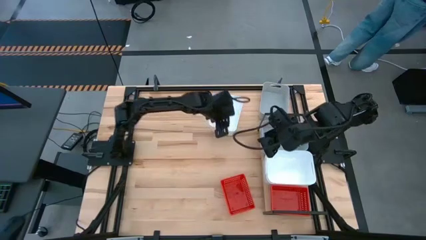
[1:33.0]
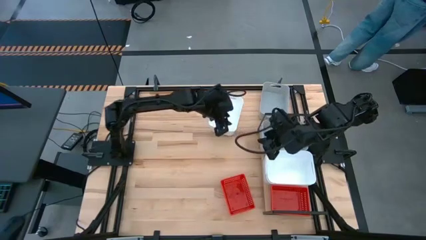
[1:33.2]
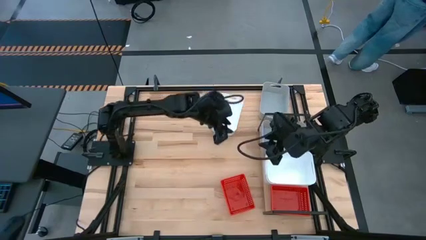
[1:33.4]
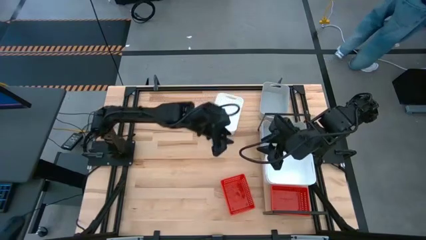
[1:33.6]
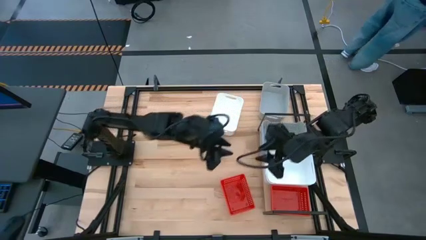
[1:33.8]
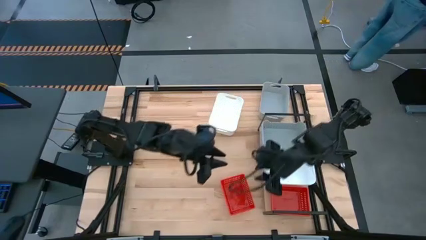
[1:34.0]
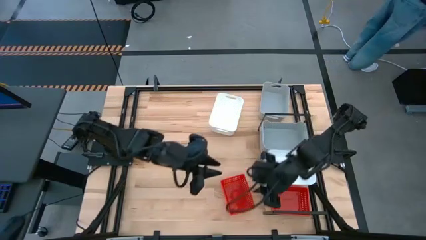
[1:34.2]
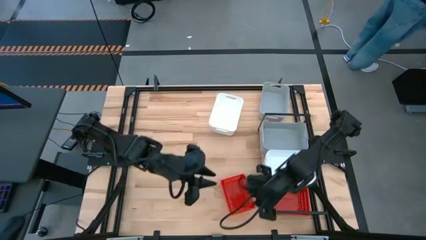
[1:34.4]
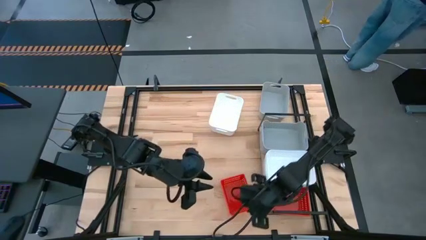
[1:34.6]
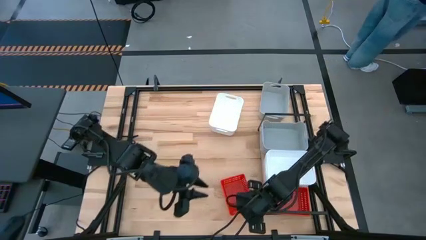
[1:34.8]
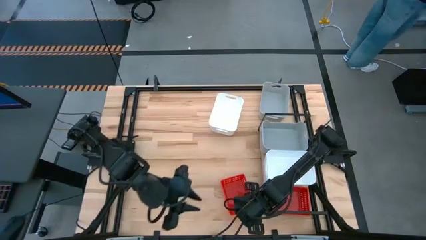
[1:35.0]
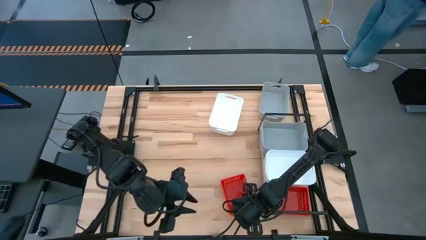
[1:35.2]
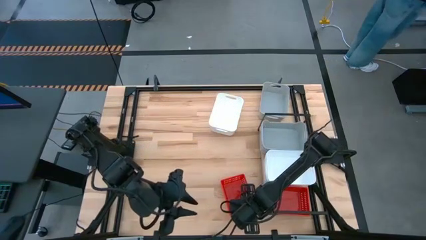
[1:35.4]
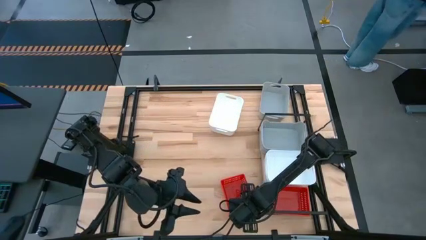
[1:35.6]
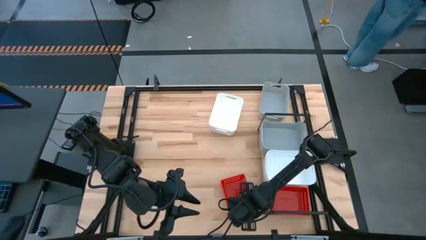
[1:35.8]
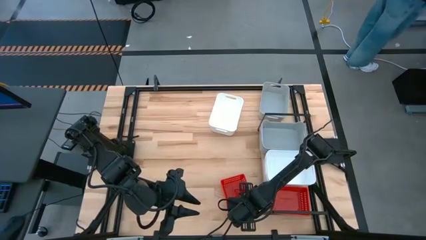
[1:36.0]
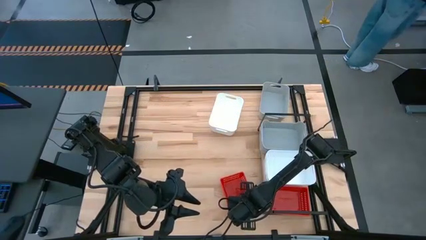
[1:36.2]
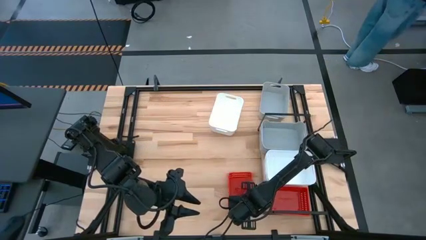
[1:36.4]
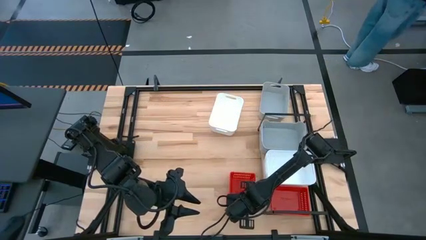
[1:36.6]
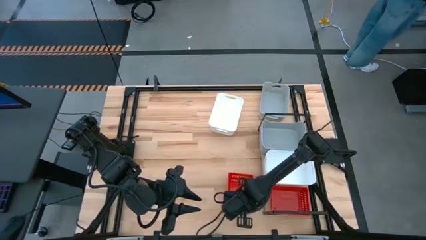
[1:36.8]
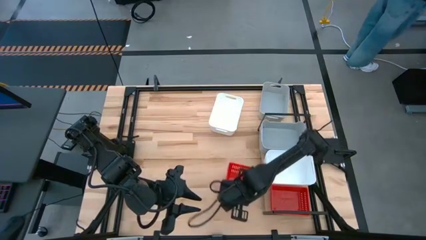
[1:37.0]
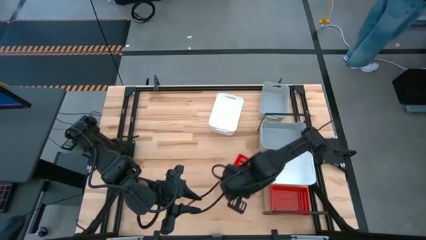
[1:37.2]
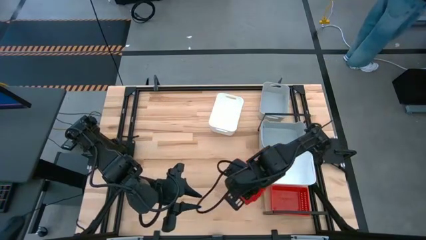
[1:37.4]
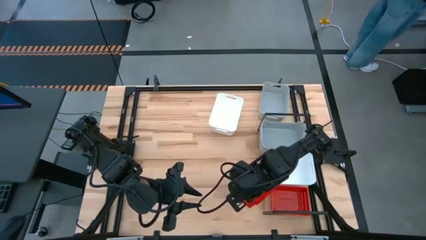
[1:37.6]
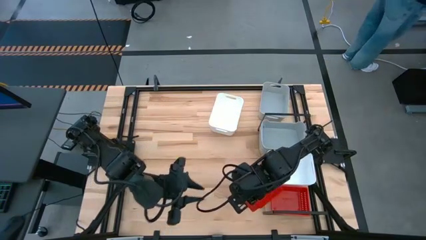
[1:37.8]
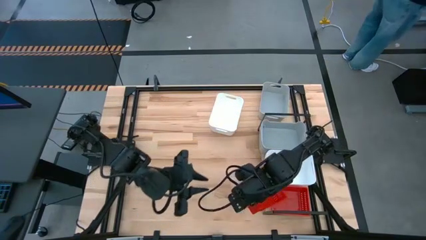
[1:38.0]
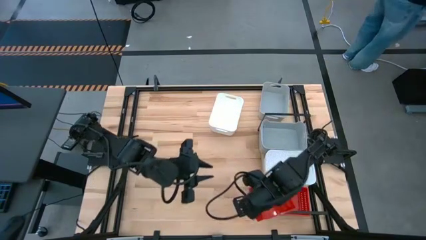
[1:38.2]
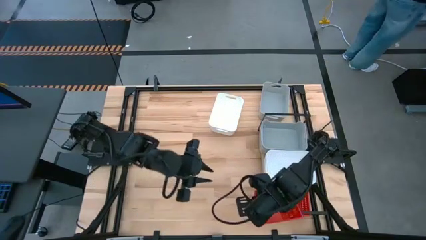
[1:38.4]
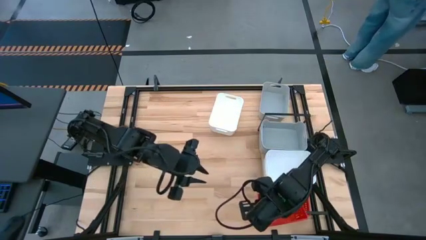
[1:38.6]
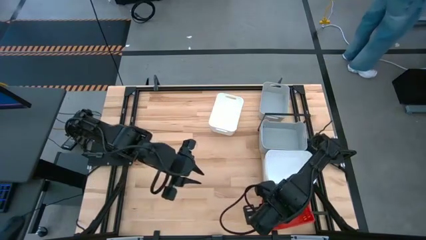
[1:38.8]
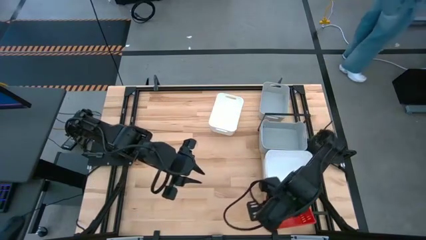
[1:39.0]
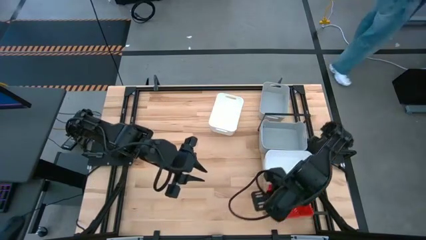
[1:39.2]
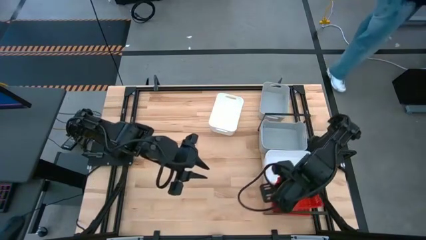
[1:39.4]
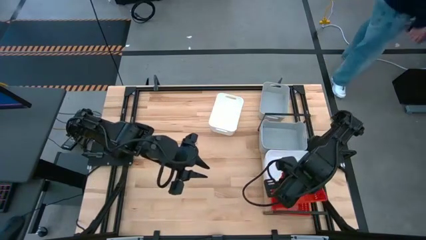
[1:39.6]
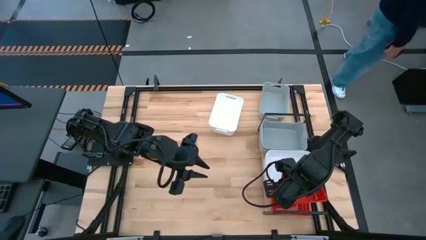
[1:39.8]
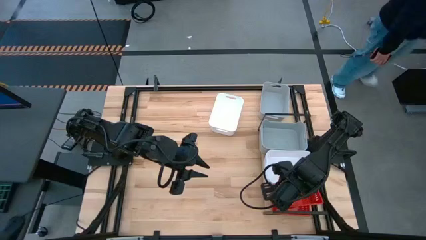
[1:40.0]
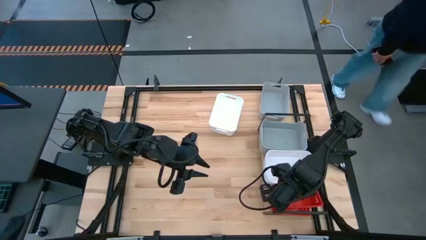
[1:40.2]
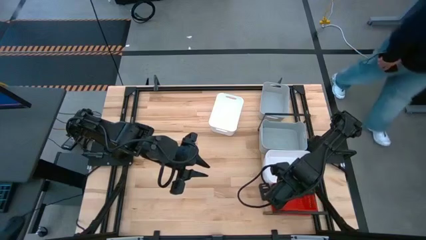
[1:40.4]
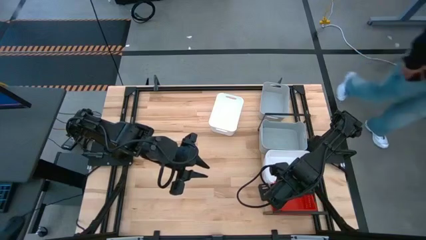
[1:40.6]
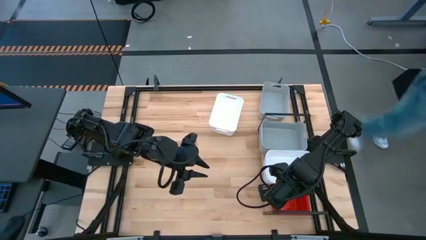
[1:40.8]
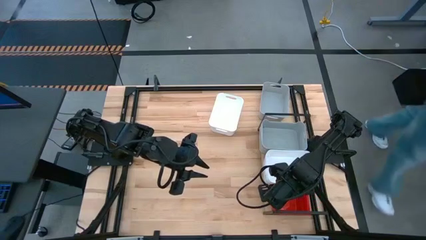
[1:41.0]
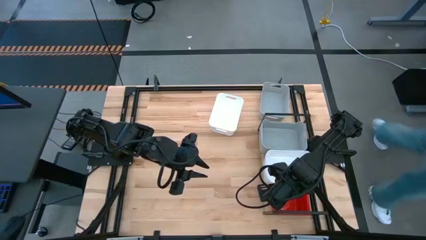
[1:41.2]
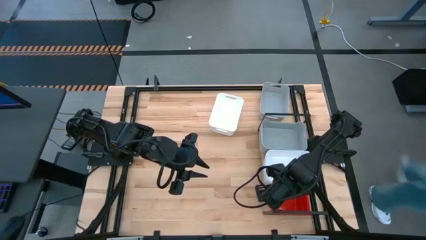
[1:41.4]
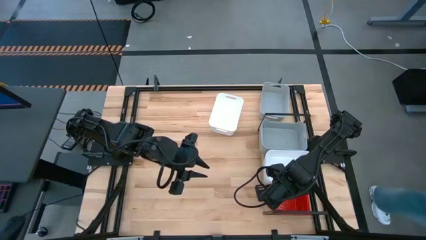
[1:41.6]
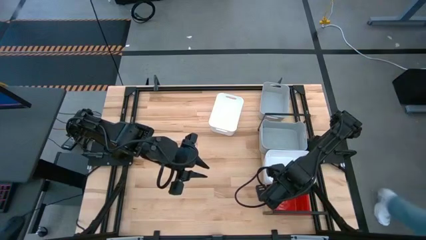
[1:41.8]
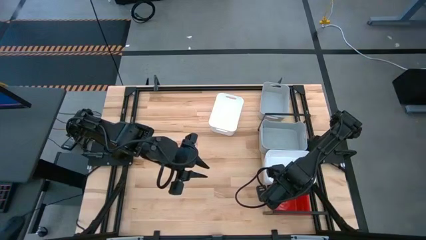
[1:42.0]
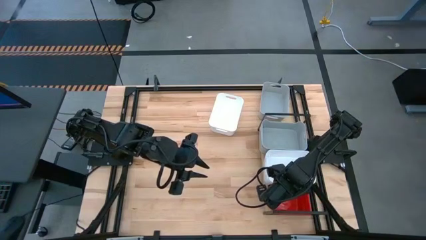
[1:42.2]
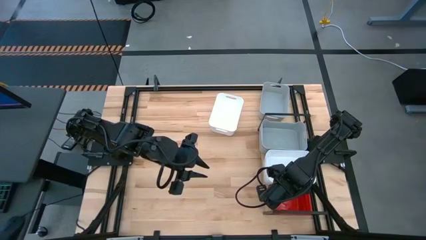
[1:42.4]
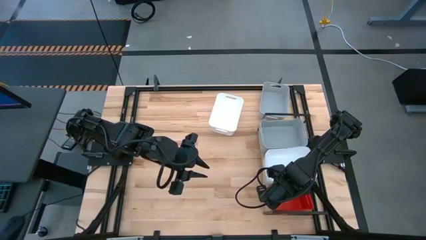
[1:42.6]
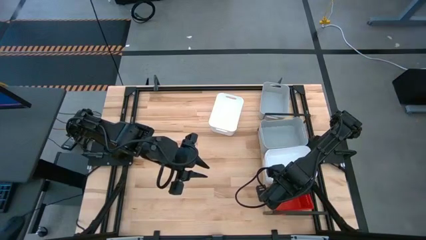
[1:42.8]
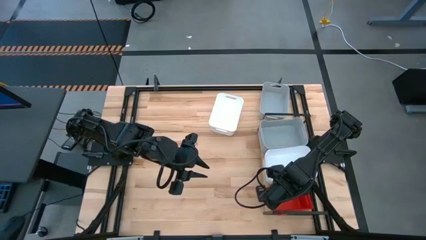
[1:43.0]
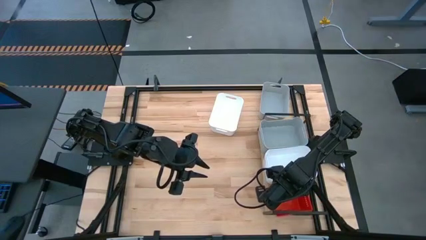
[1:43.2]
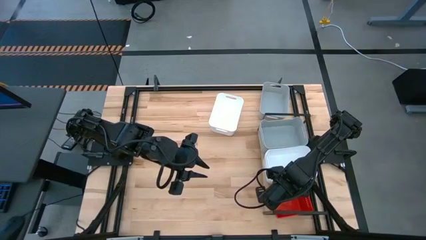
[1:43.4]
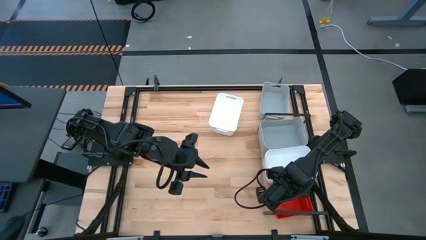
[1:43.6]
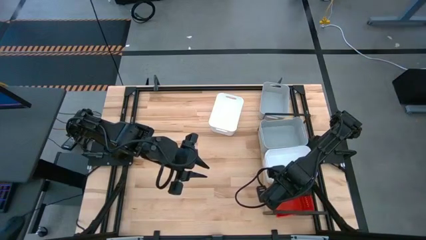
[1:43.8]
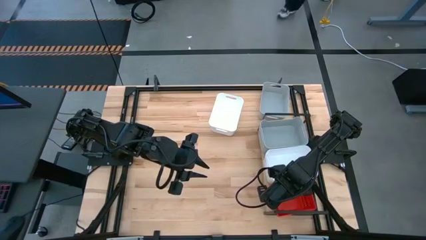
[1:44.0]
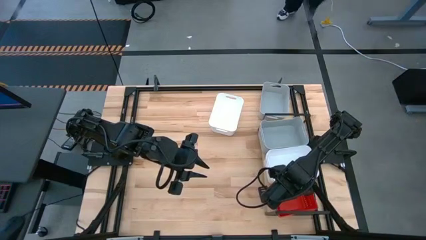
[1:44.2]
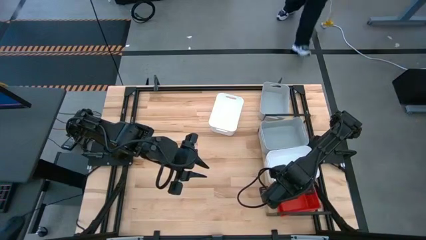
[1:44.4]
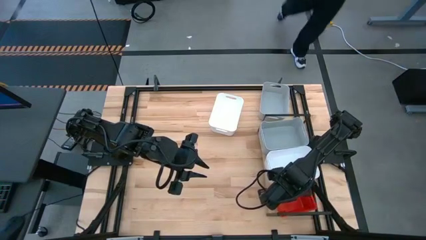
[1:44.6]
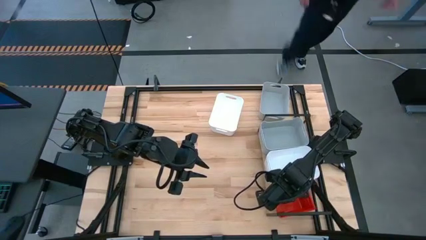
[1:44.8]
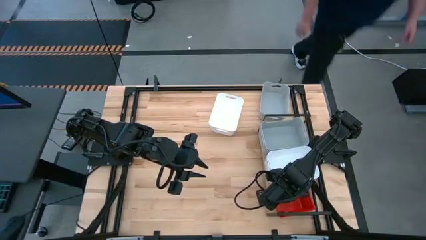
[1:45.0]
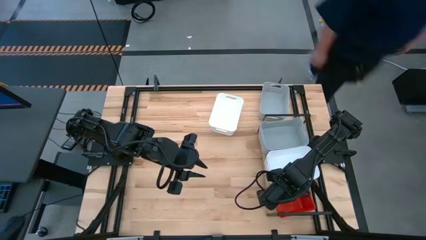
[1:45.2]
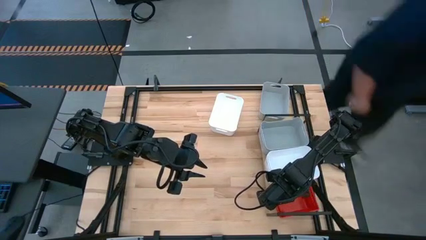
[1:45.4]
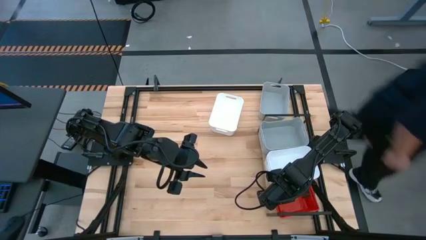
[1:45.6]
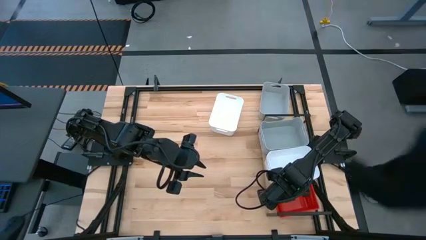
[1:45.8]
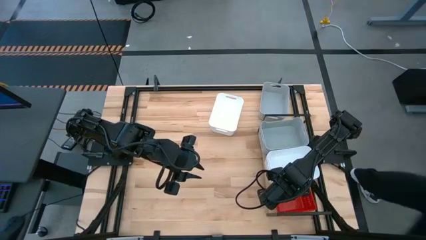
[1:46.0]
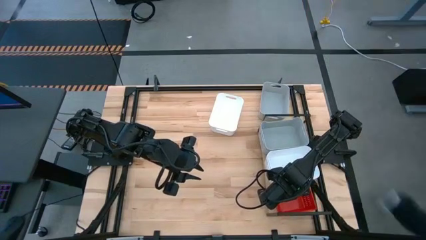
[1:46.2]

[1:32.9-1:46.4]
Task: Stack baskets on shelf by color
Stack the red bin on top of the red bin on the shelf

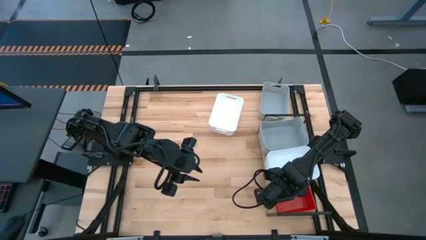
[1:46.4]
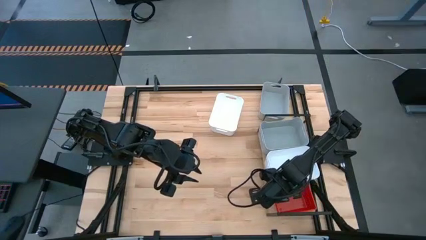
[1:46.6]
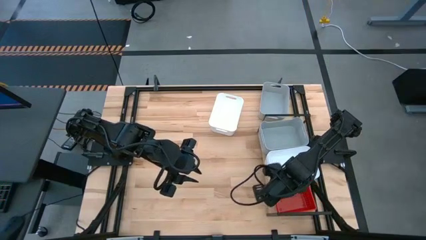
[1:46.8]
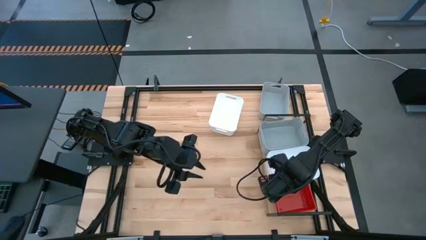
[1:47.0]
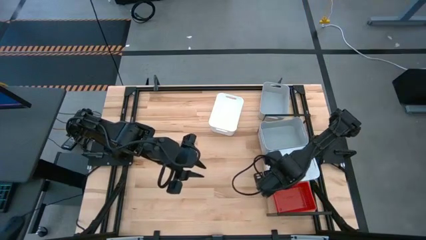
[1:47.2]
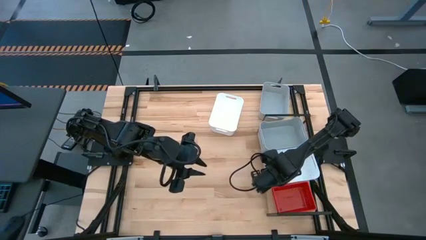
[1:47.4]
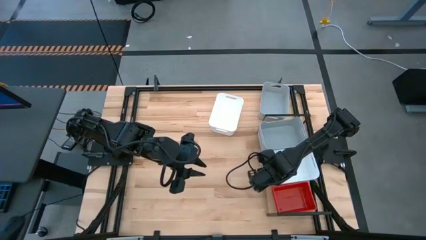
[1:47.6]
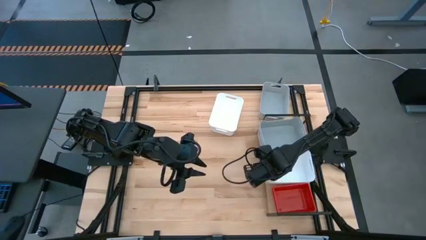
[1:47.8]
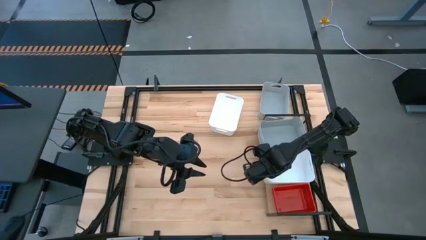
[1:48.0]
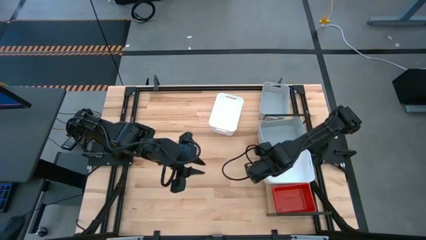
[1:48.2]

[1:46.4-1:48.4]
Adjust the stacked white bins on the shelf
